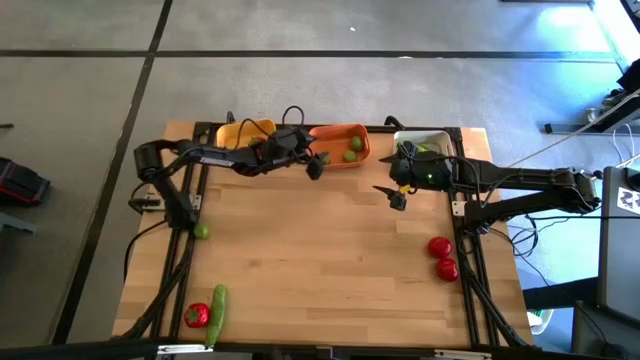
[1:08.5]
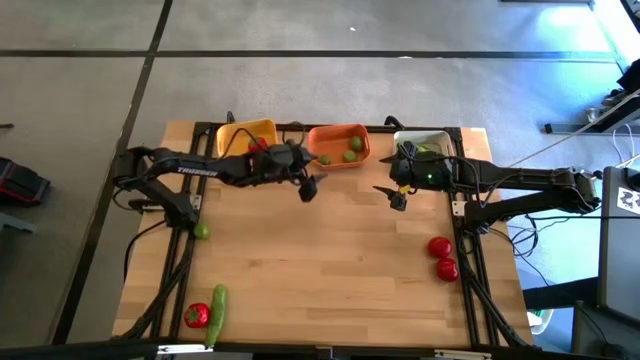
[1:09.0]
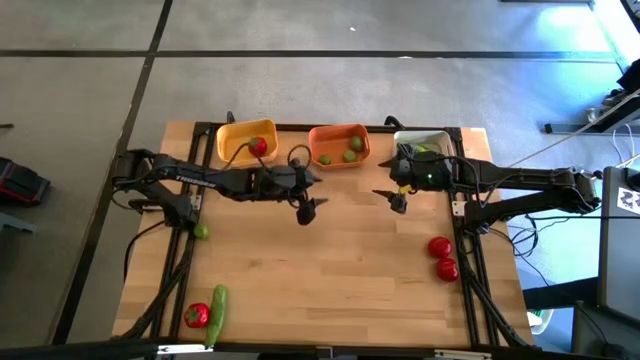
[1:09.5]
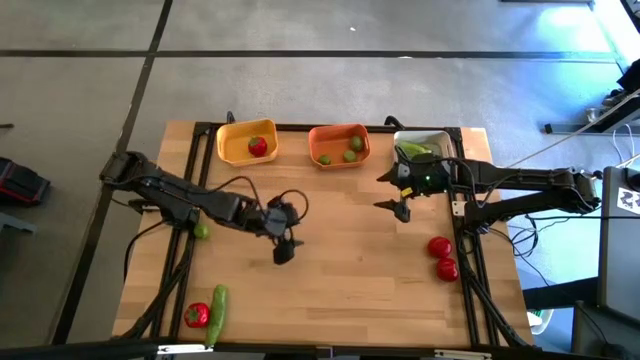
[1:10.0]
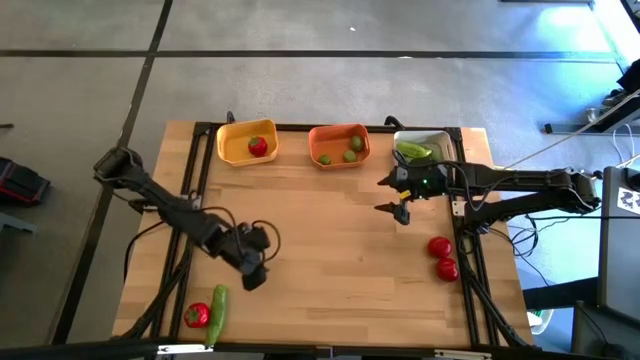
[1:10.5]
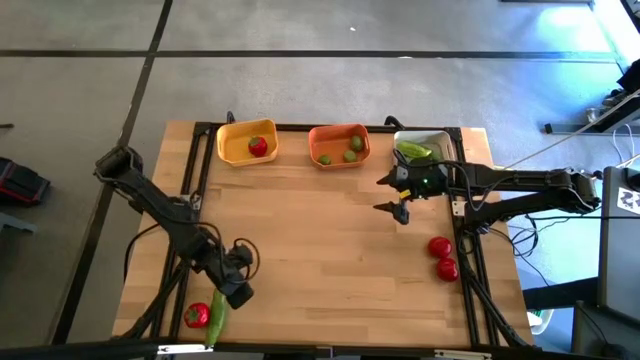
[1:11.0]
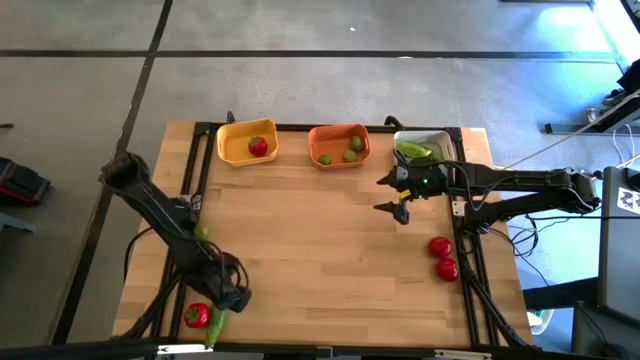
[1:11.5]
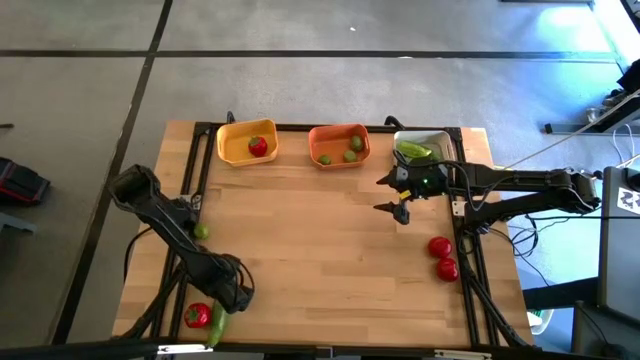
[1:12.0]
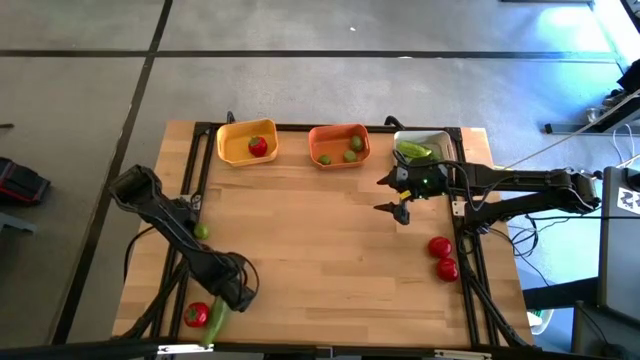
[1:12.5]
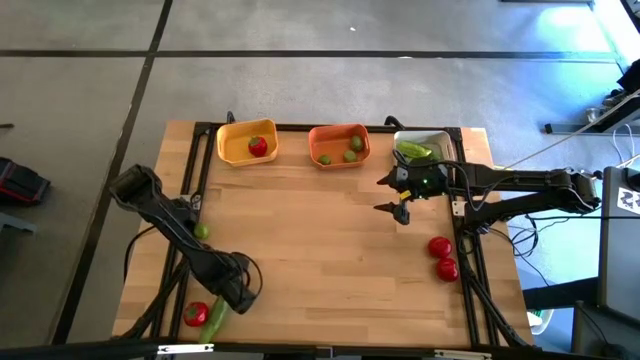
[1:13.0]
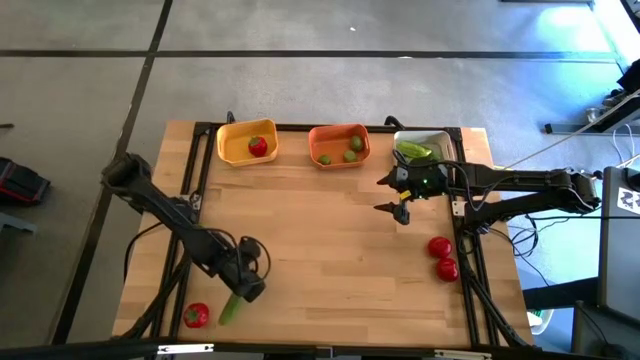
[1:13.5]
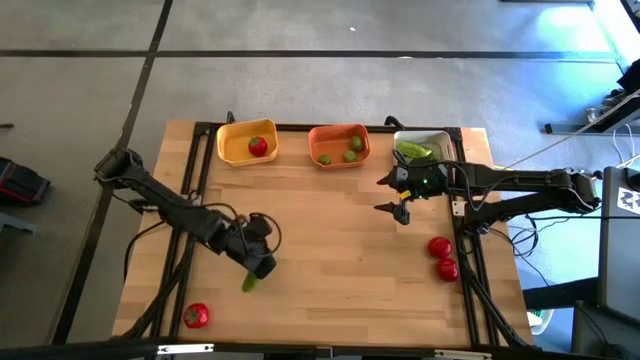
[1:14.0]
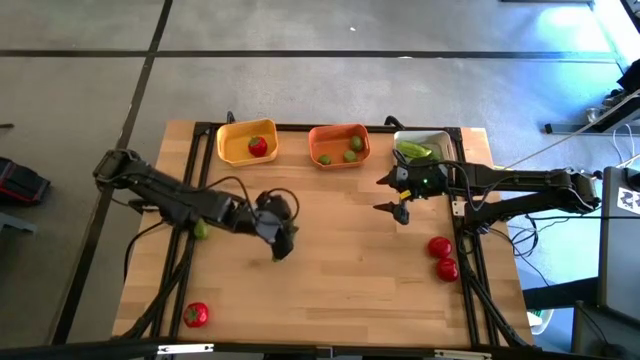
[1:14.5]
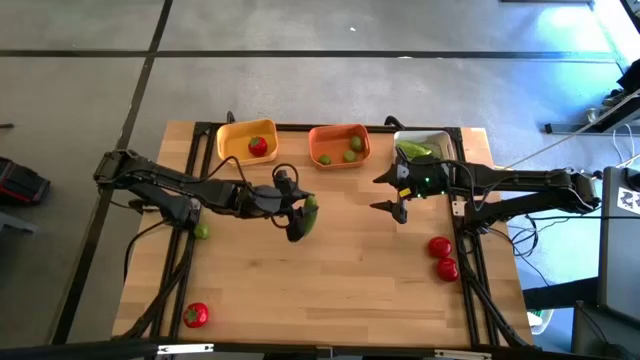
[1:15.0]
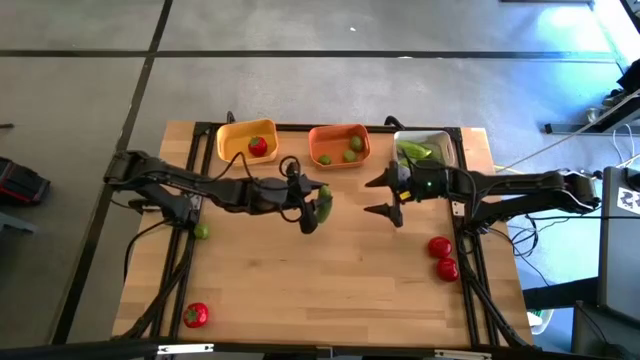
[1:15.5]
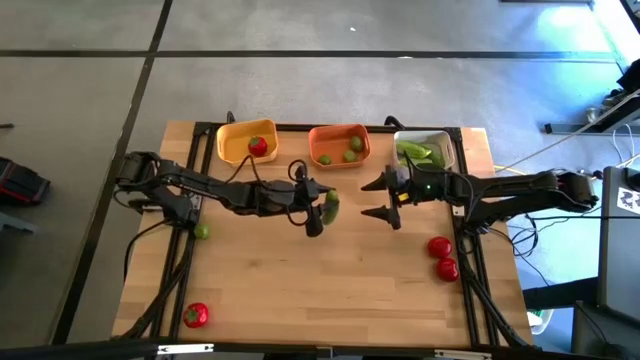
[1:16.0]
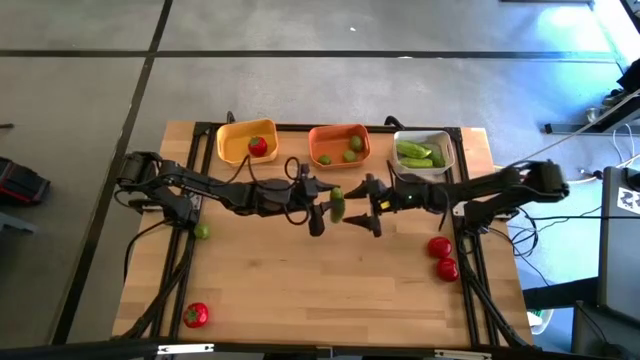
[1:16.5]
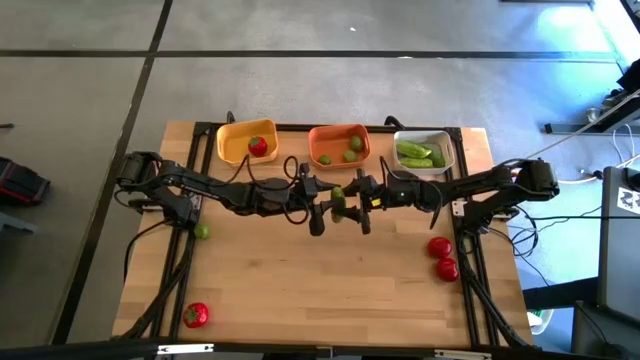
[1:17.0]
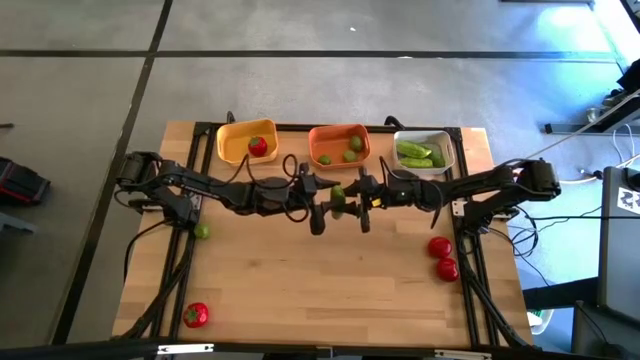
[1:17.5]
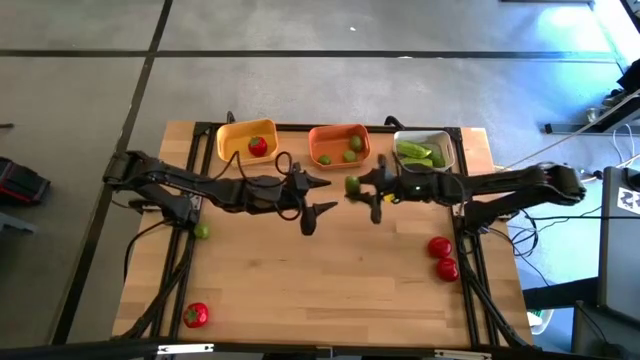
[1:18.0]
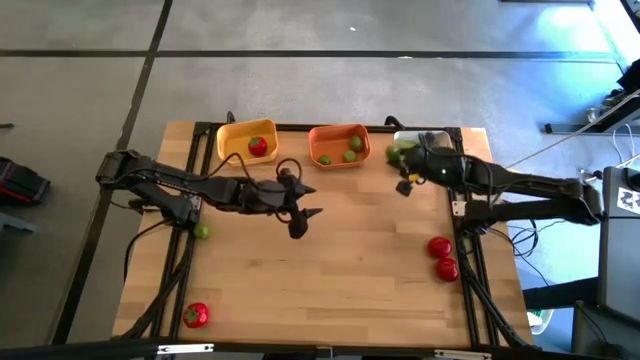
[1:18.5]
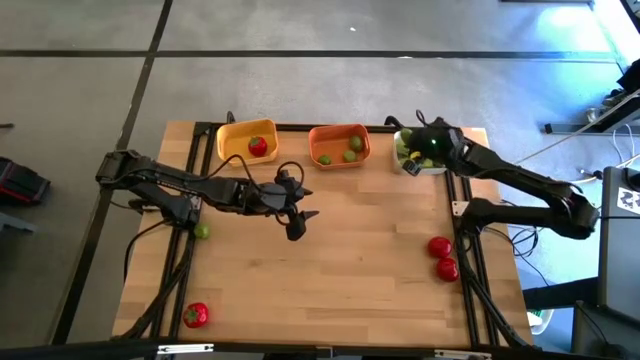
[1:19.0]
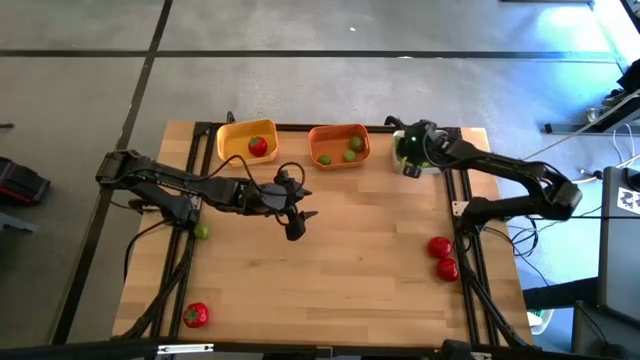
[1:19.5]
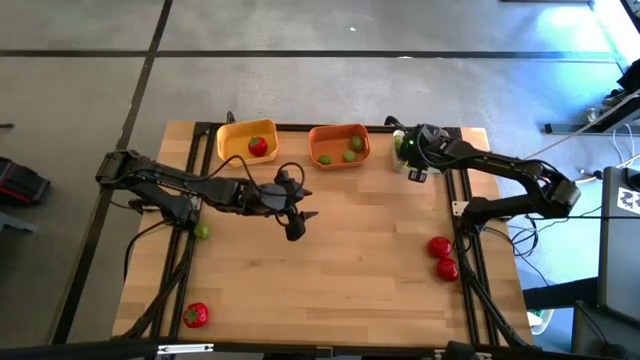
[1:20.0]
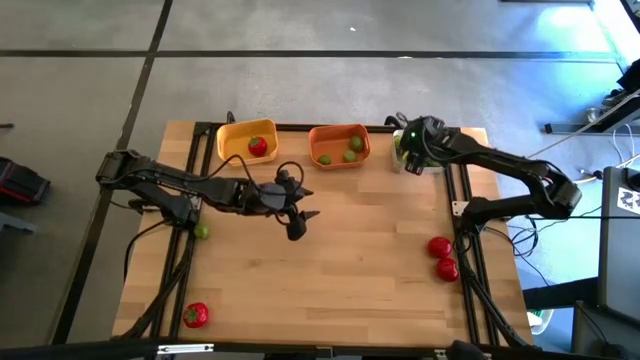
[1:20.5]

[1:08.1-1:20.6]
Task: Sort produce into baskets
Put the cucumber into the white bin

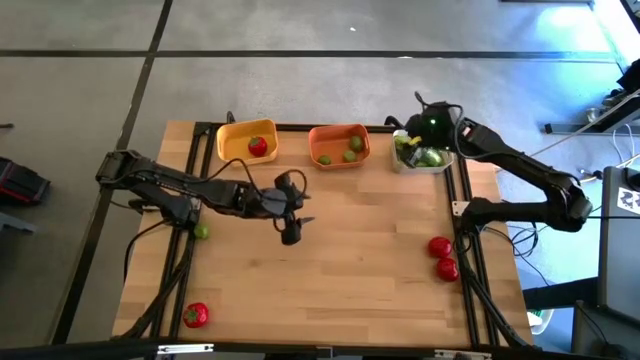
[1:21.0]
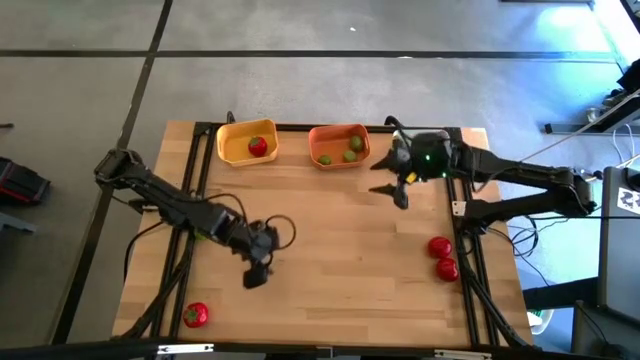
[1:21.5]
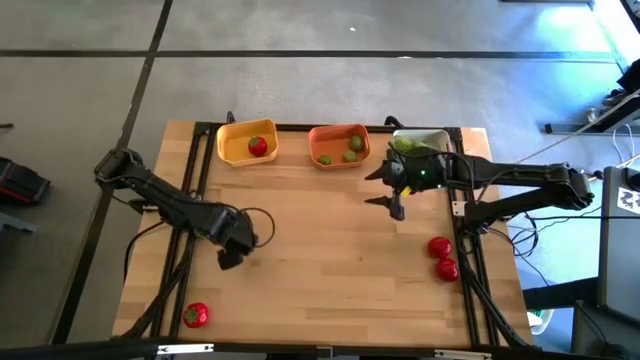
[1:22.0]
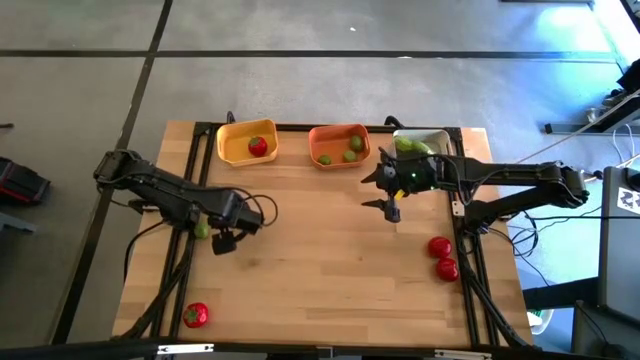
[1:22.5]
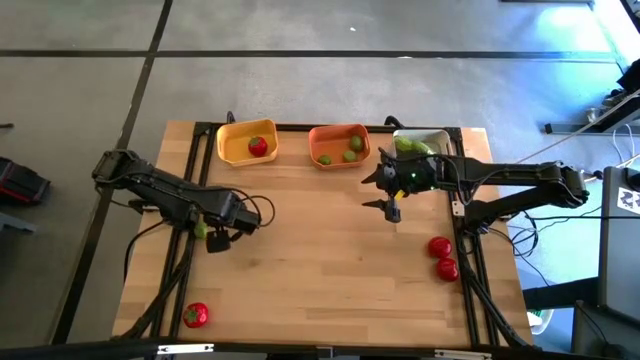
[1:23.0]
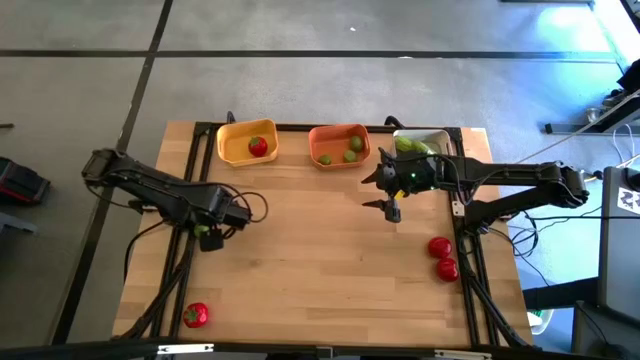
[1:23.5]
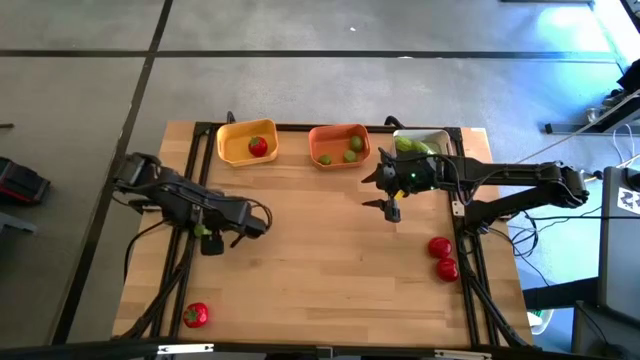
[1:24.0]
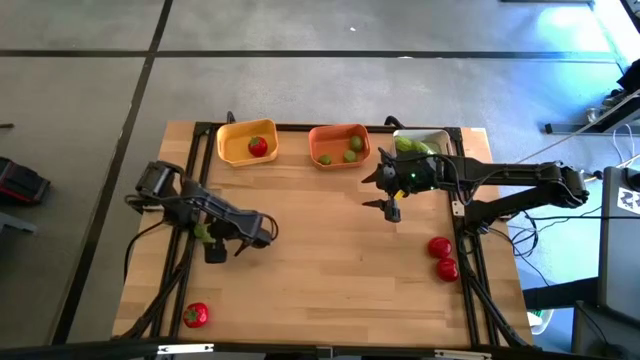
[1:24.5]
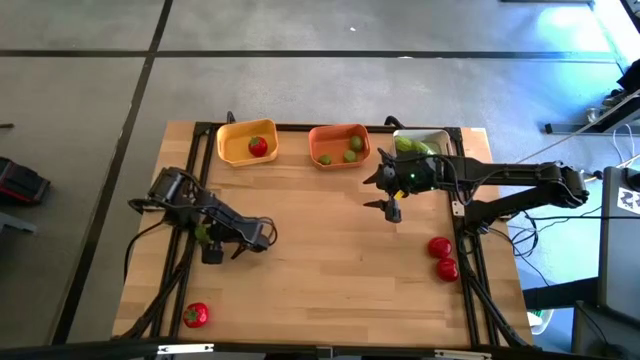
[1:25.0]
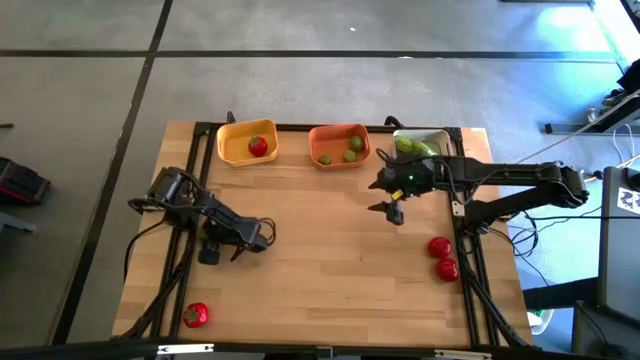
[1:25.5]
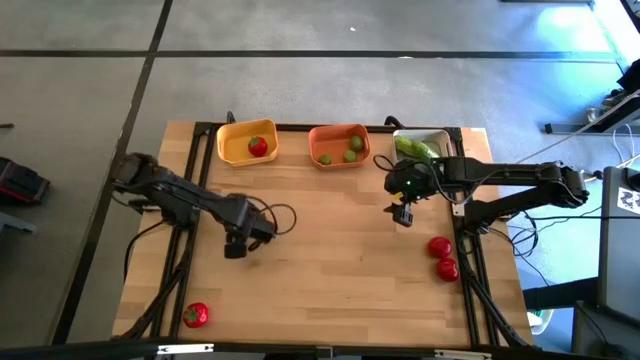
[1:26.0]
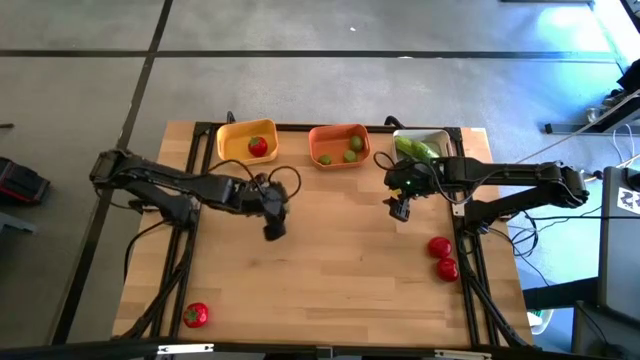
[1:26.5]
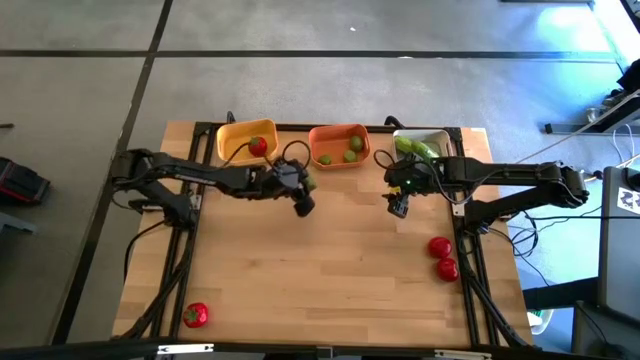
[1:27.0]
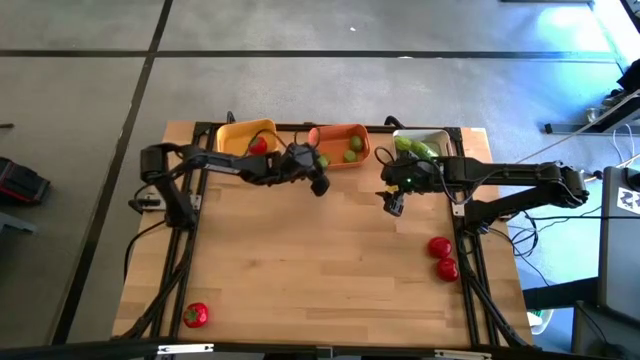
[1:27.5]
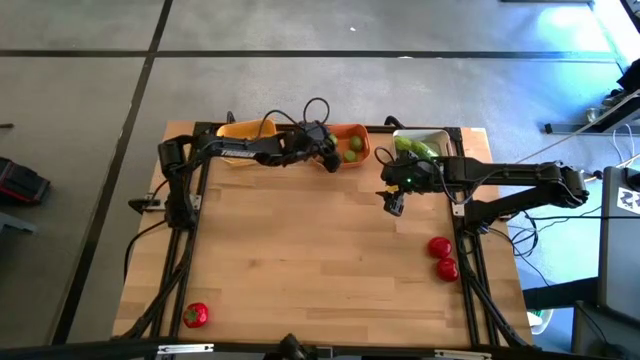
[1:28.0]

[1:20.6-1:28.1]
Put the lime into the orange bin

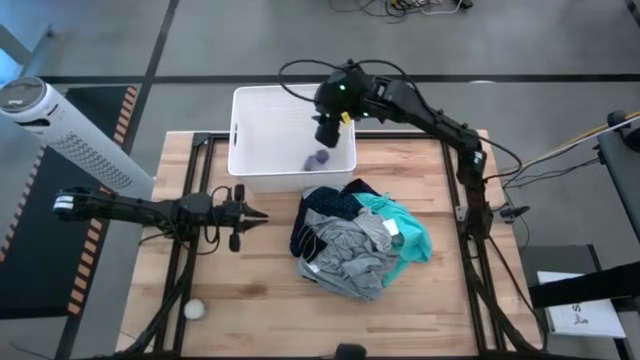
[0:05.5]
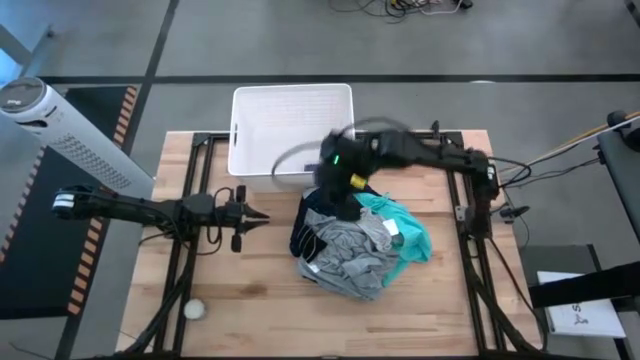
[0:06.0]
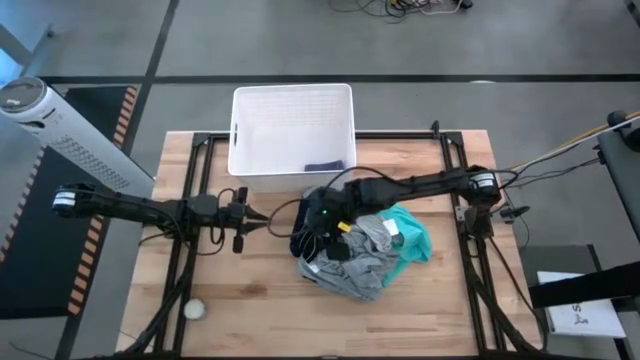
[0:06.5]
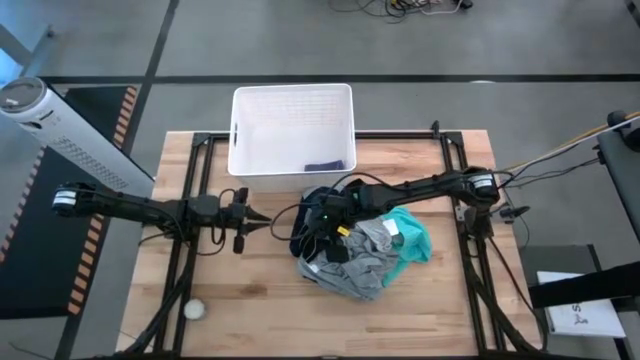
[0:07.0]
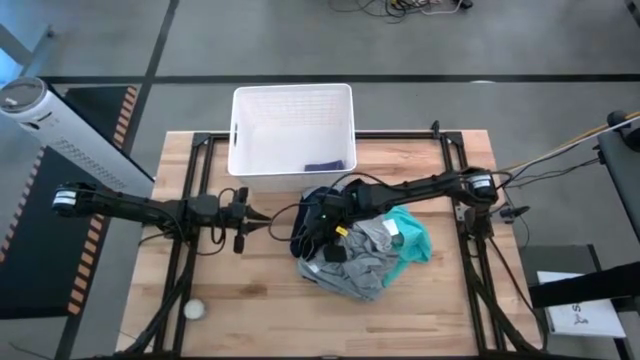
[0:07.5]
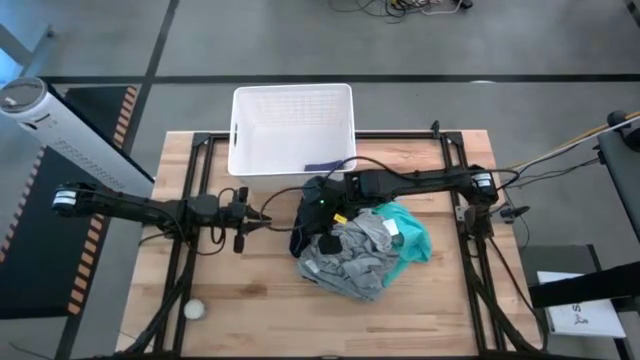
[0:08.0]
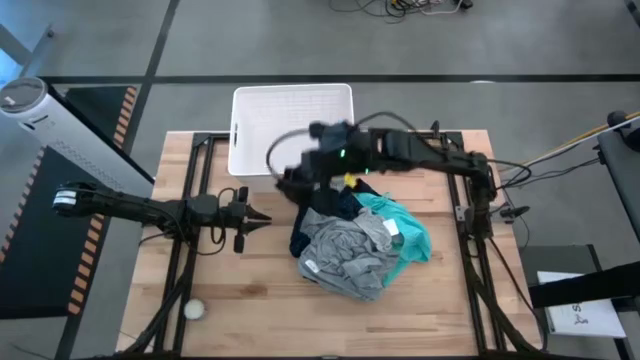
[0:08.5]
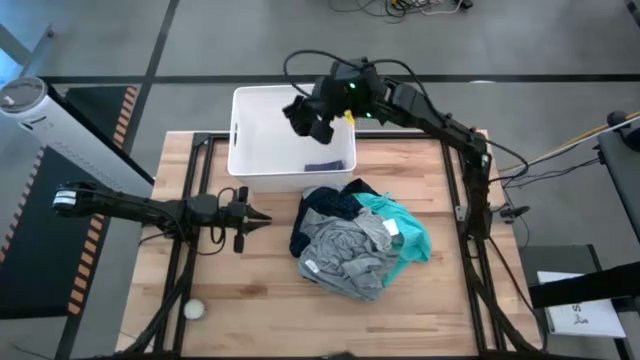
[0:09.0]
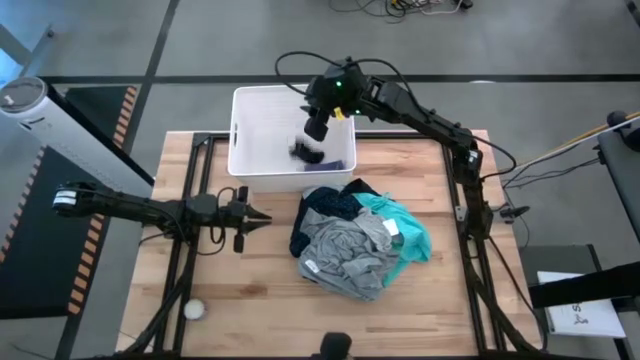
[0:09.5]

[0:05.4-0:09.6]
Task: Sort clothes
Put the black sock into the white laundry bin
